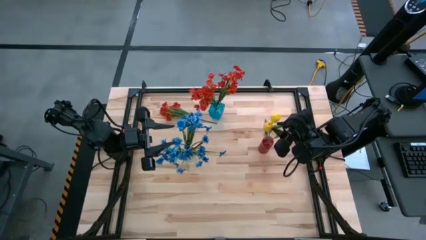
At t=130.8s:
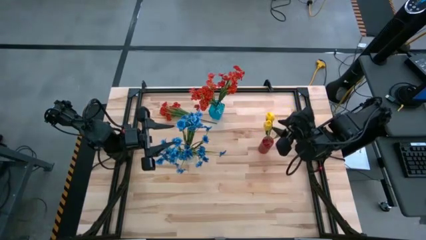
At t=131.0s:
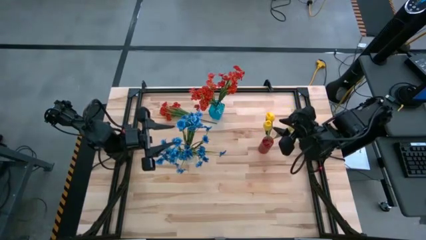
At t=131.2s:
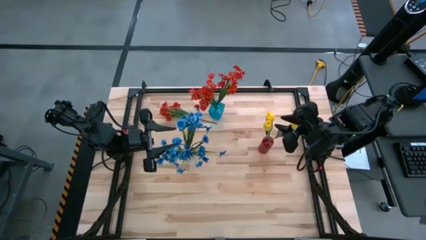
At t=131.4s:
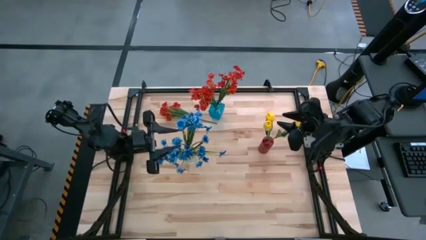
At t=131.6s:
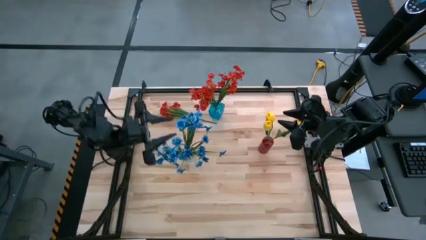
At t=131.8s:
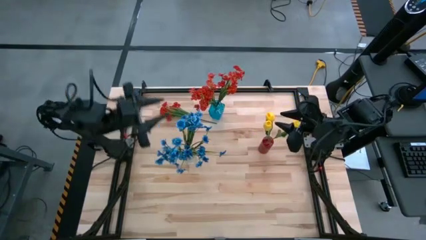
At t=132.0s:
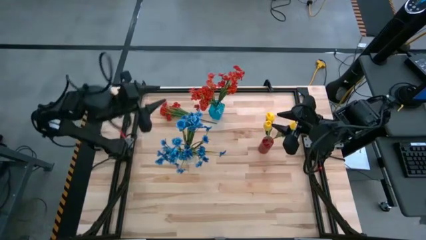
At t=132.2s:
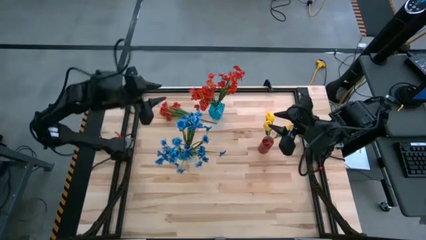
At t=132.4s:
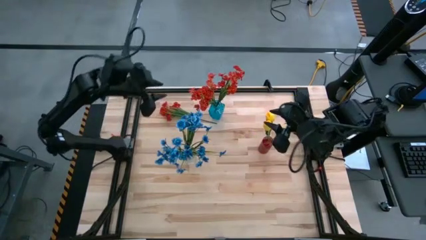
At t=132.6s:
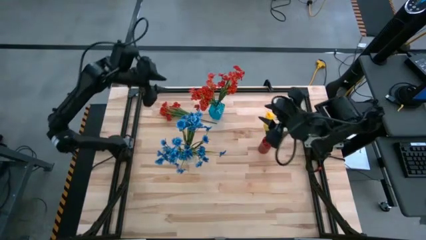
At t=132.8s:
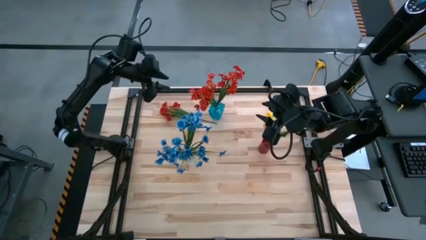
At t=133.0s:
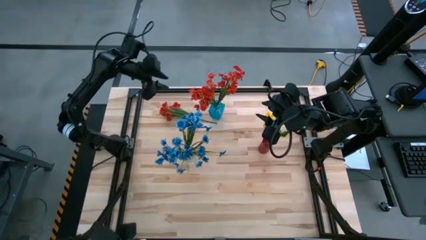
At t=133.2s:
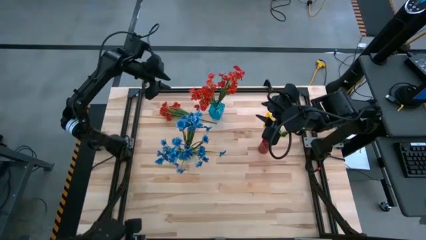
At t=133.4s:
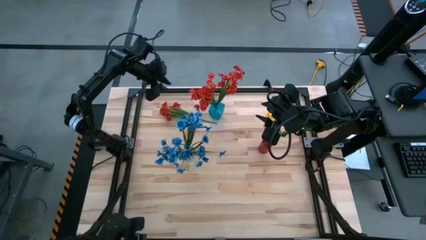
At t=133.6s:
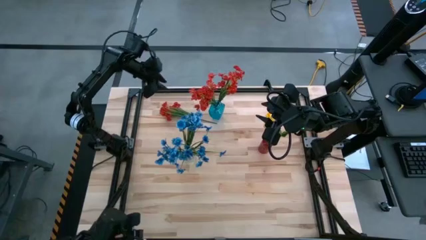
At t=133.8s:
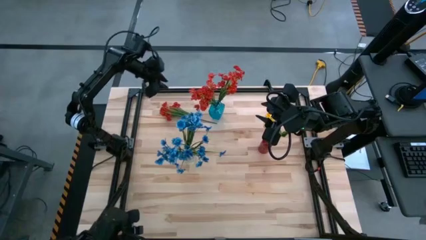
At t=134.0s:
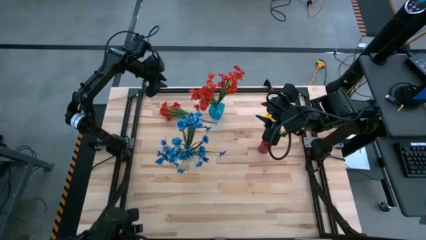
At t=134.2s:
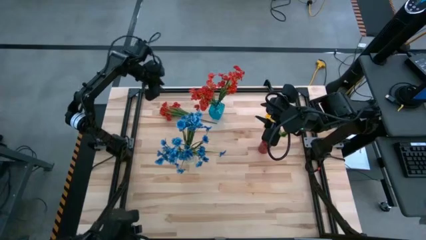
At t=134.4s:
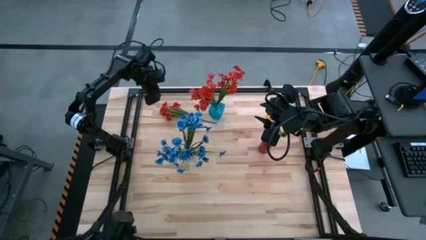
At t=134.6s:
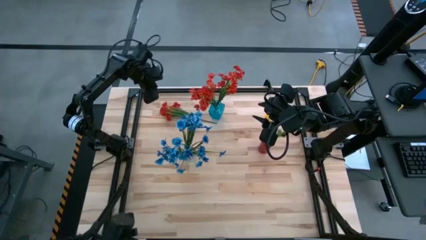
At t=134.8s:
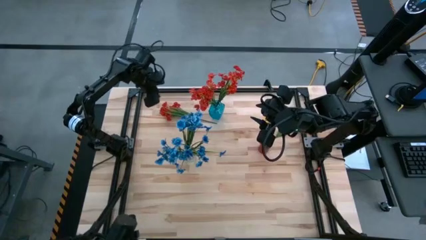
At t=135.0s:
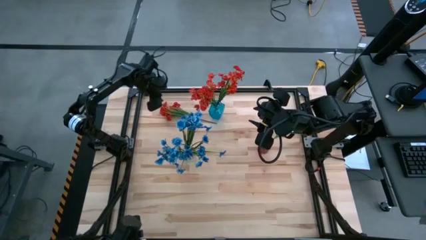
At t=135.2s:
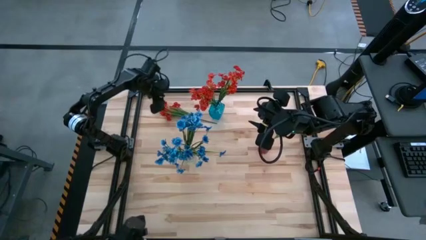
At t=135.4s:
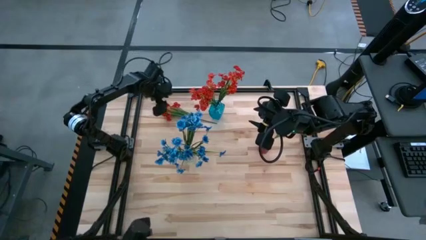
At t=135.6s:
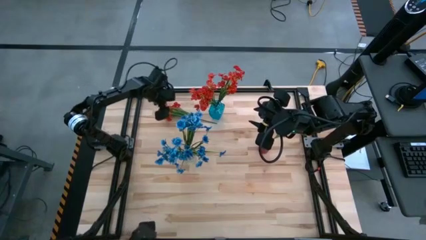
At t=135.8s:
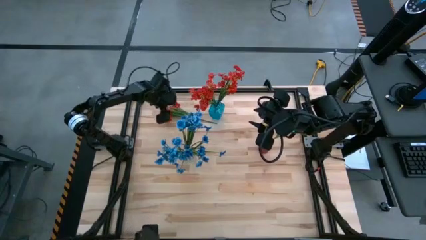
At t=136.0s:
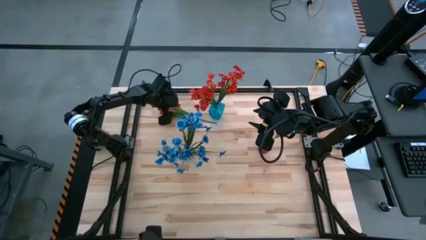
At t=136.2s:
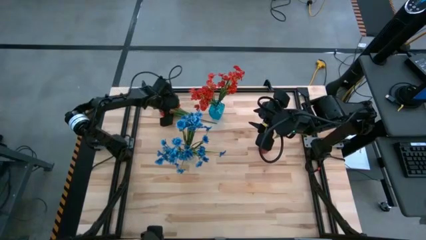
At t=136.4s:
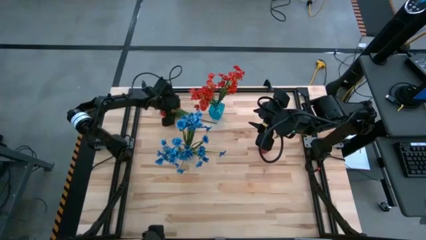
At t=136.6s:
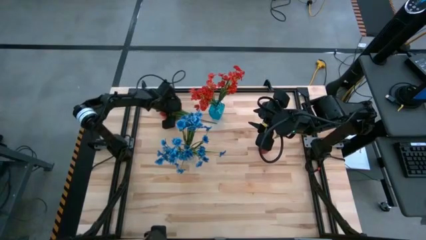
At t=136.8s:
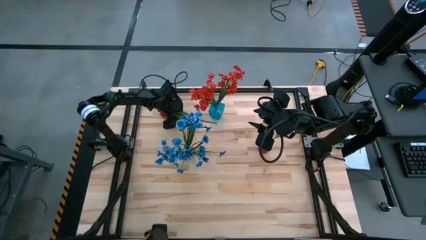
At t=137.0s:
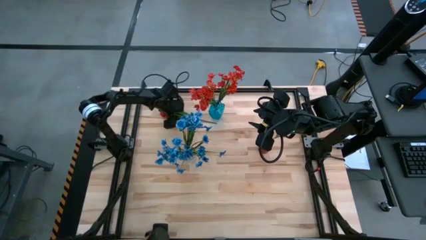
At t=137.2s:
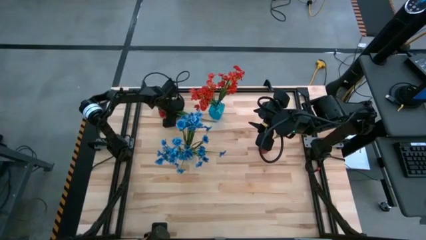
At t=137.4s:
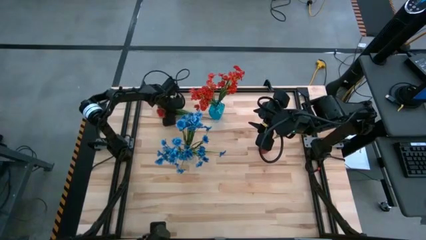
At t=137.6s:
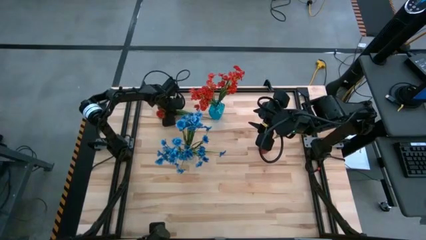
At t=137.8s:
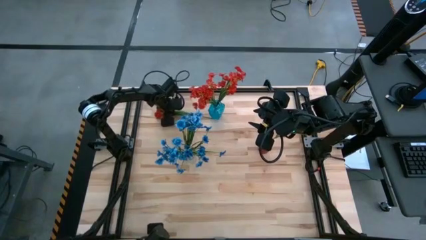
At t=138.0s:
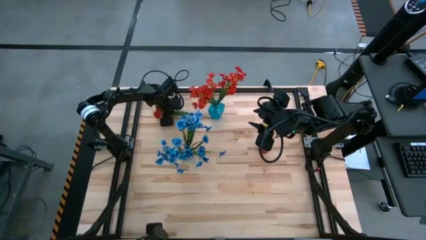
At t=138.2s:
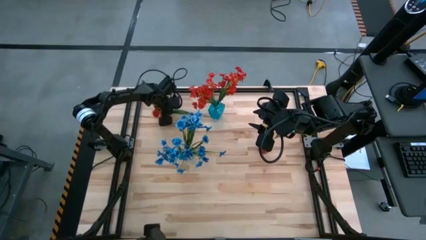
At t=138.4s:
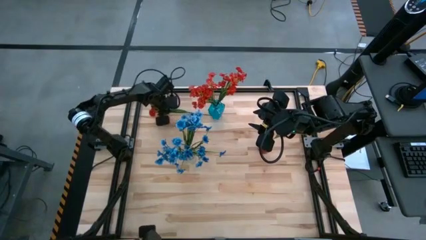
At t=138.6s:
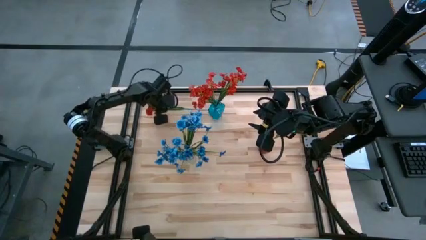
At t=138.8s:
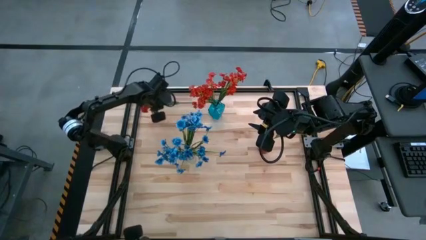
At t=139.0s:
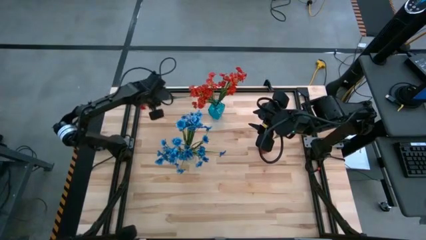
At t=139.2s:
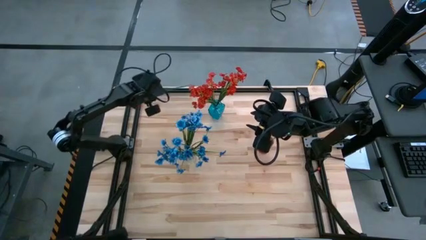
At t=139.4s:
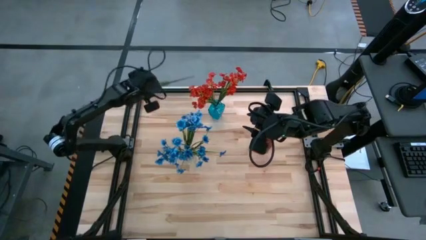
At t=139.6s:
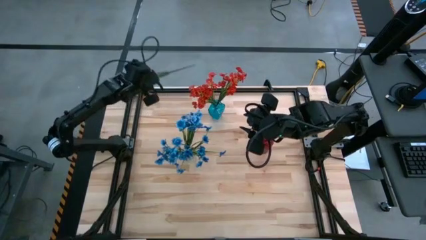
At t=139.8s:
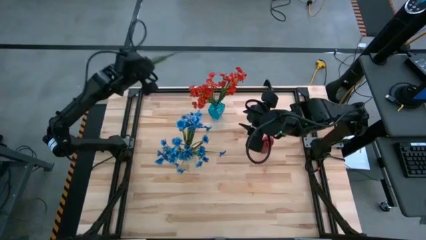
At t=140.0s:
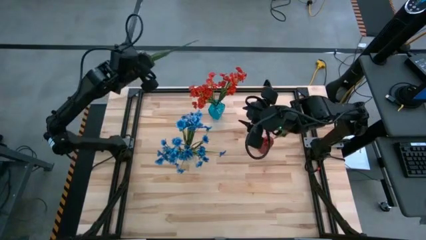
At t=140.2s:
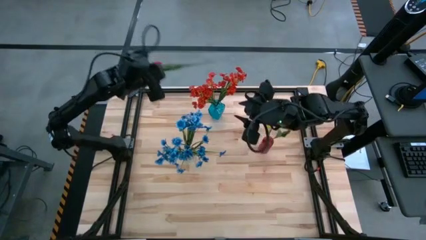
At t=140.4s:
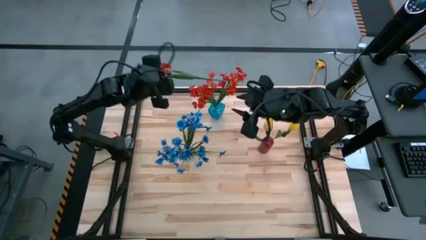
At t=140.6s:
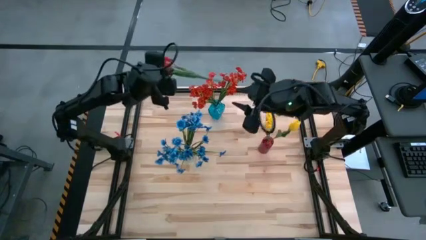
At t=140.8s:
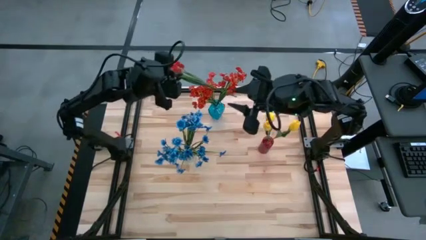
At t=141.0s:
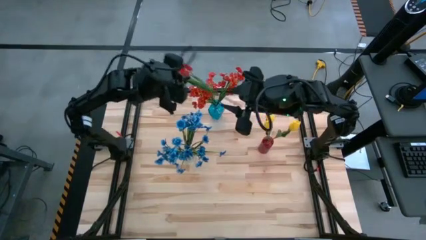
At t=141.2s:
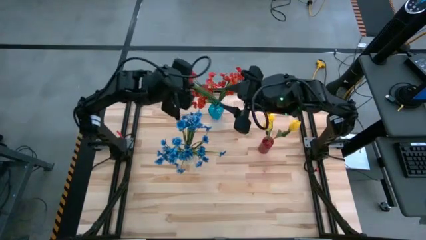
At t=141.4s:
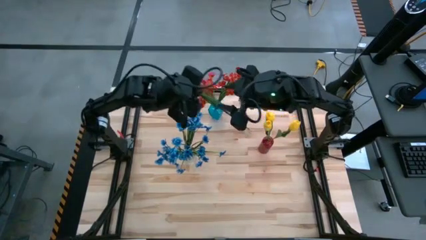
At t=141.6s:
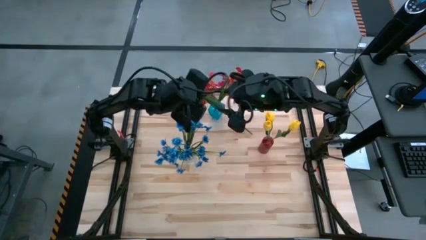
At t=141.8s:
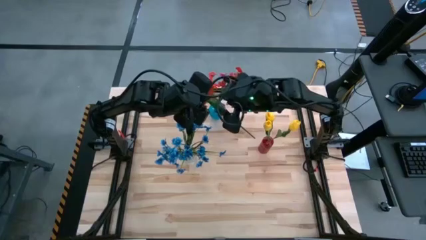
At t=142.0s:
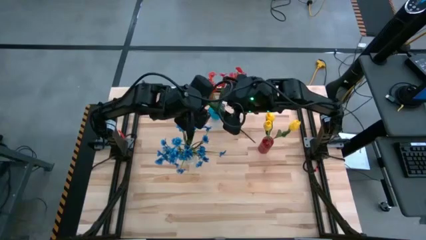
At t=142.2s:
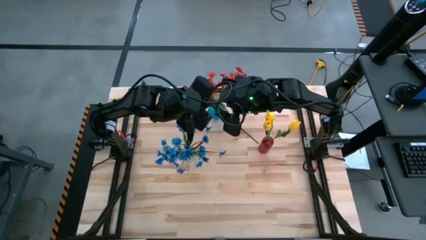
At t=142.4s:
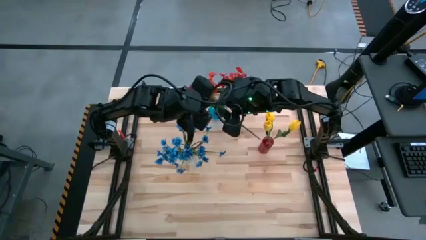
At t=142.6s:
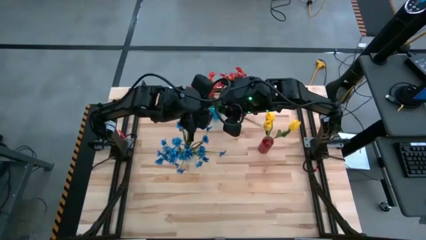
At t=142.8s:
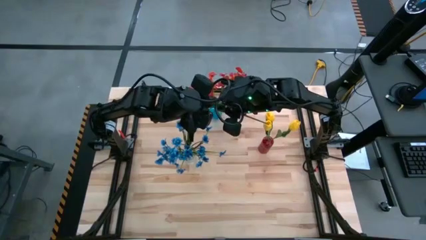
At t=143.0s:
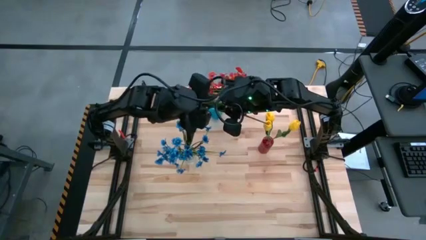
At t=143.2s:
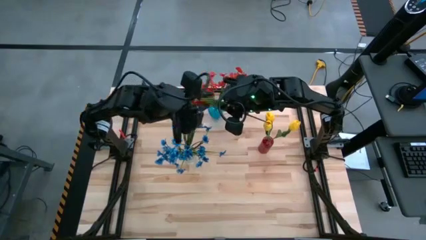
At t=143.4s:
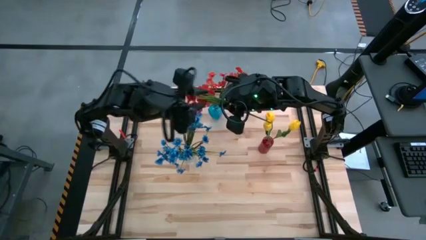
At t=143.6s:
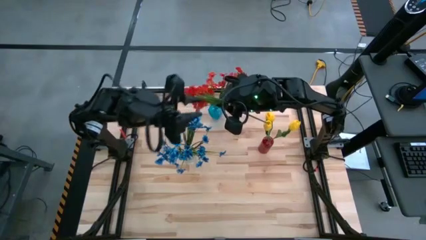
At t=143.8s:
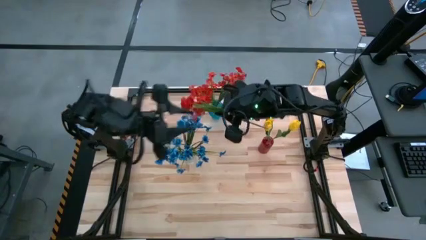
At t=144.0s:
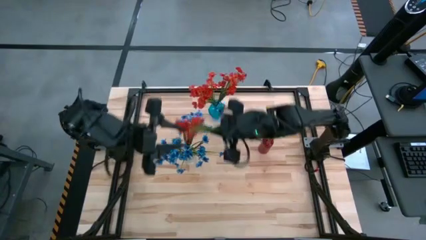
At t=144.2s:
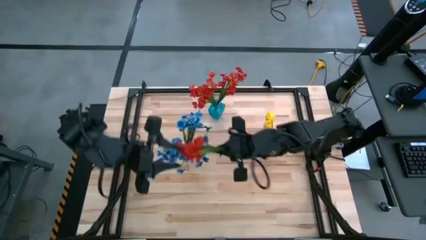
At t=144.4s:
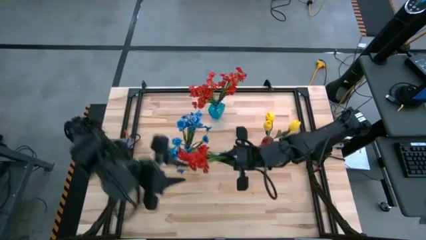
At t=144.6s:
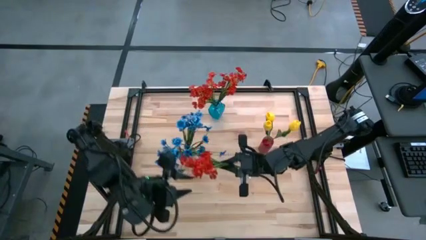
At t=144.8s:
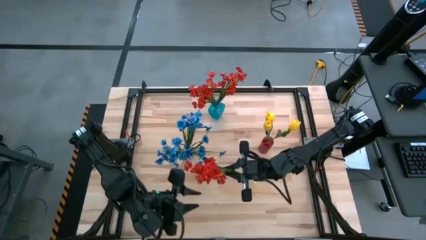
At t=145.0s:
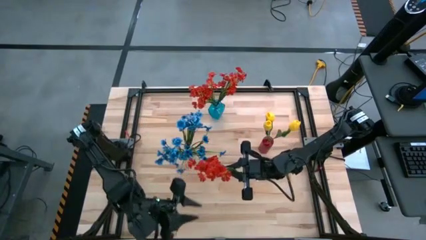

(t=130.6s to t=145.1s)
Task: Sort flowers into vase by color
Put the red flowers into the blue vase
